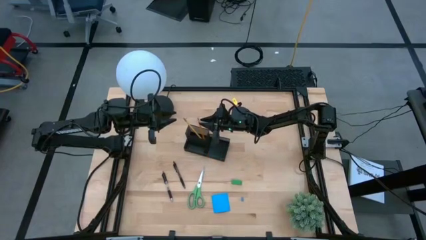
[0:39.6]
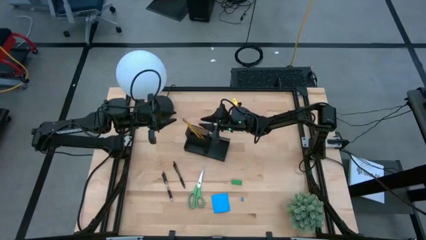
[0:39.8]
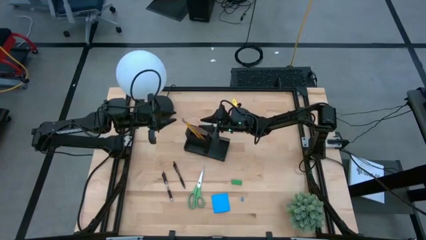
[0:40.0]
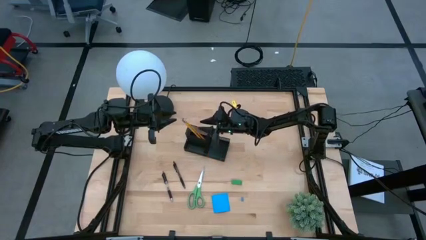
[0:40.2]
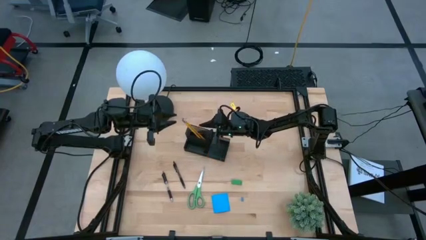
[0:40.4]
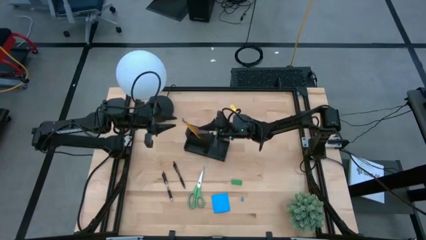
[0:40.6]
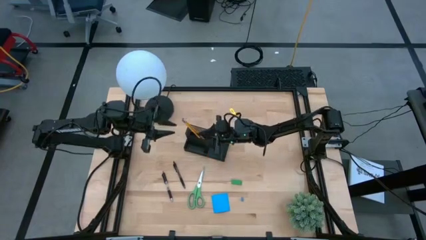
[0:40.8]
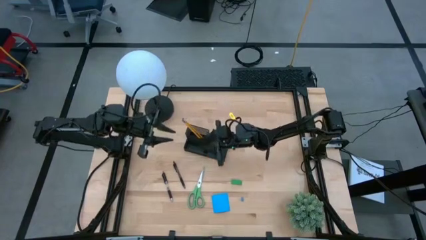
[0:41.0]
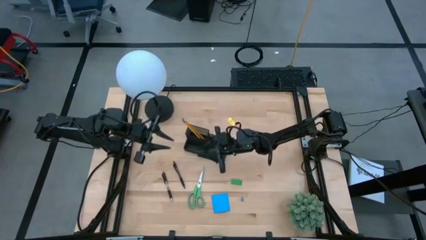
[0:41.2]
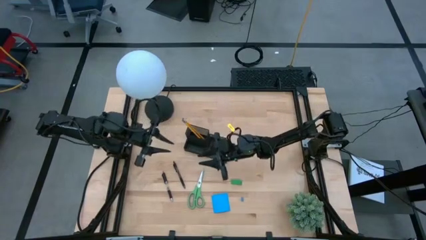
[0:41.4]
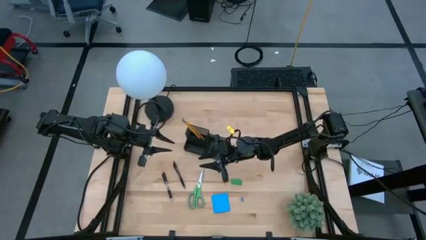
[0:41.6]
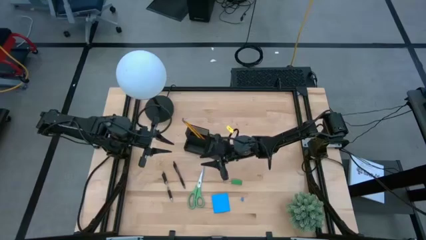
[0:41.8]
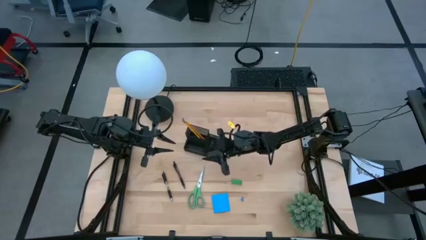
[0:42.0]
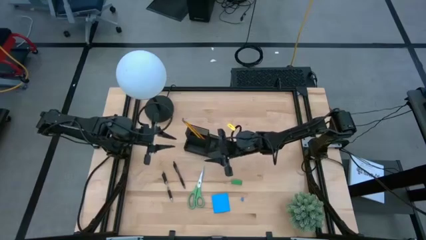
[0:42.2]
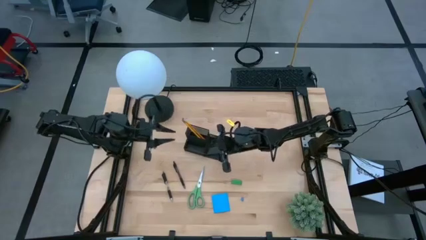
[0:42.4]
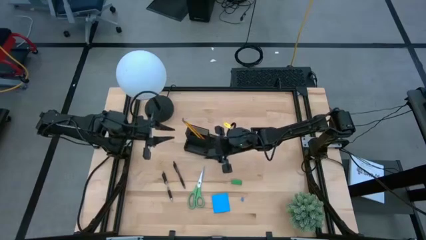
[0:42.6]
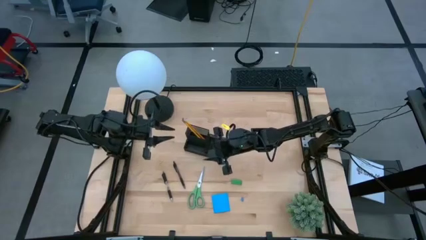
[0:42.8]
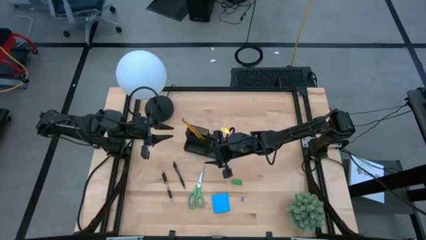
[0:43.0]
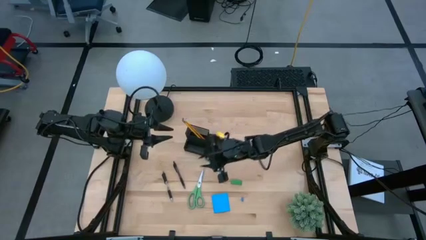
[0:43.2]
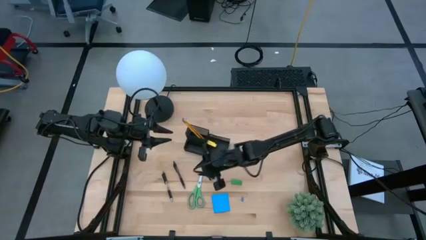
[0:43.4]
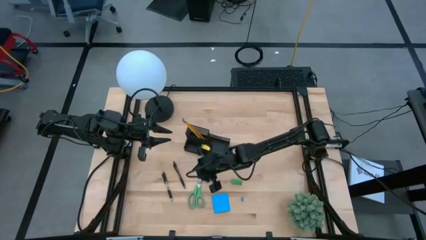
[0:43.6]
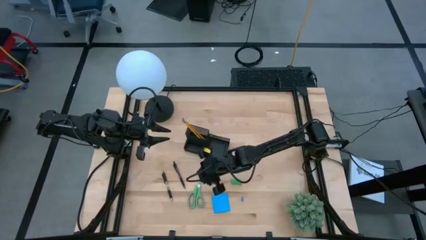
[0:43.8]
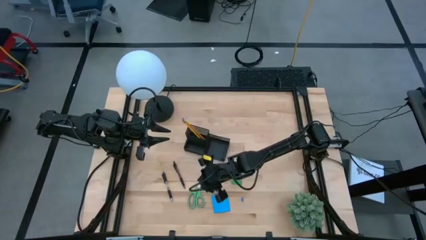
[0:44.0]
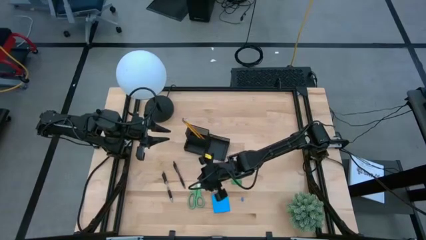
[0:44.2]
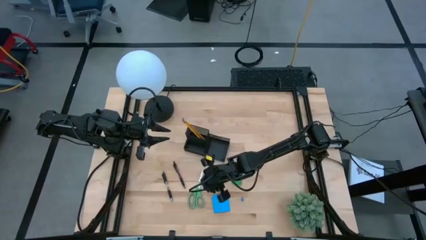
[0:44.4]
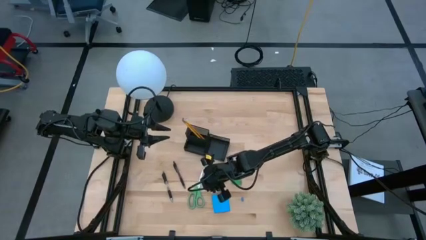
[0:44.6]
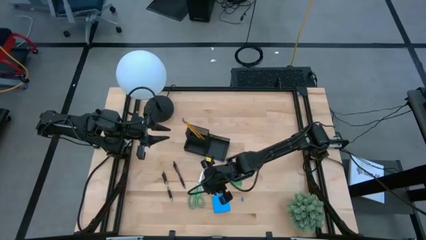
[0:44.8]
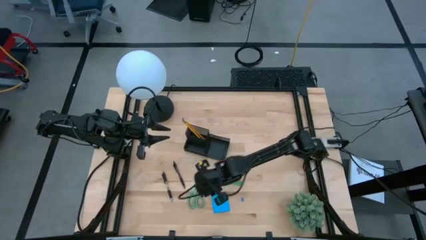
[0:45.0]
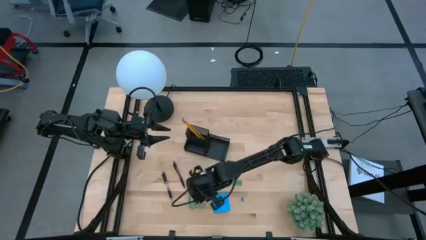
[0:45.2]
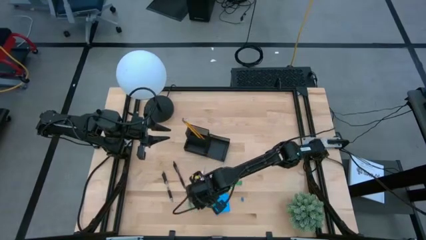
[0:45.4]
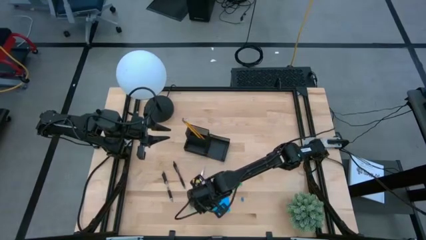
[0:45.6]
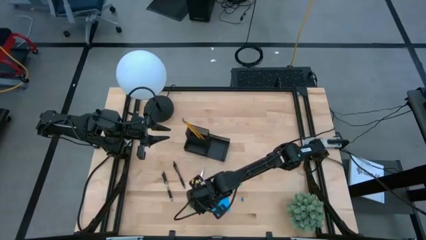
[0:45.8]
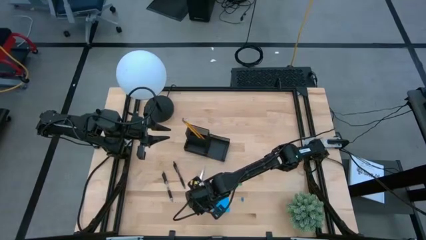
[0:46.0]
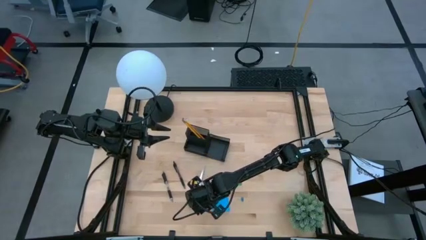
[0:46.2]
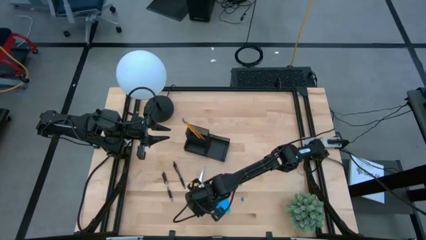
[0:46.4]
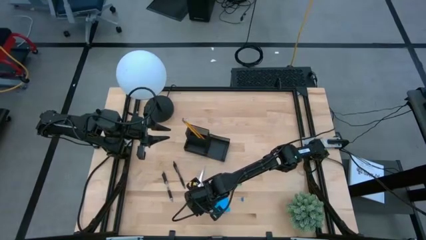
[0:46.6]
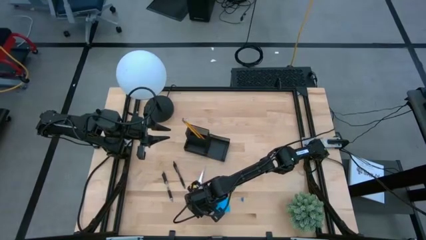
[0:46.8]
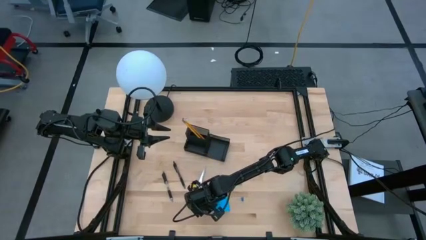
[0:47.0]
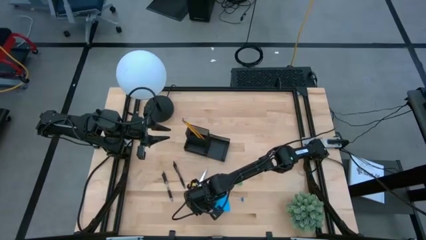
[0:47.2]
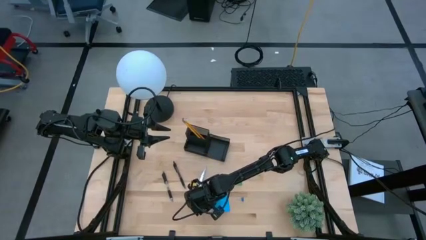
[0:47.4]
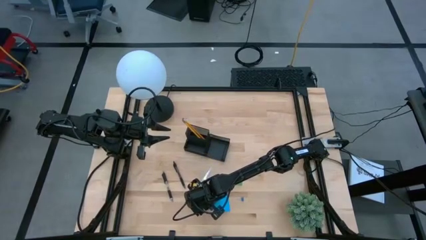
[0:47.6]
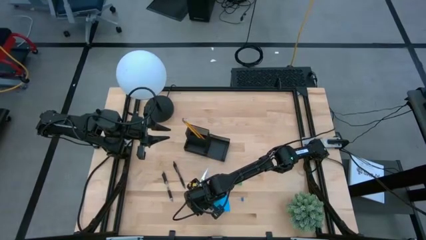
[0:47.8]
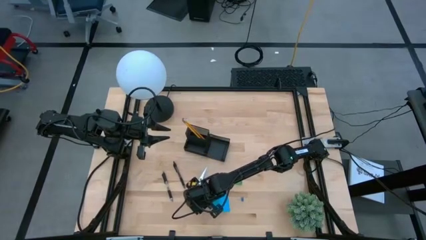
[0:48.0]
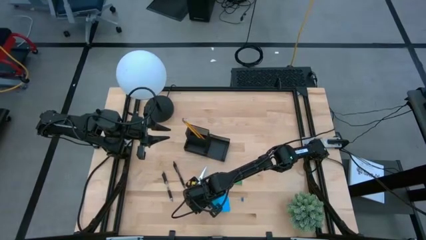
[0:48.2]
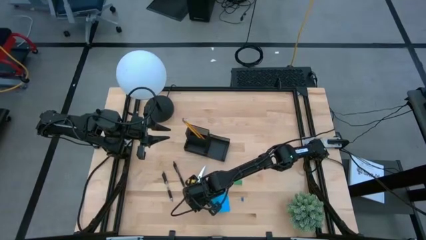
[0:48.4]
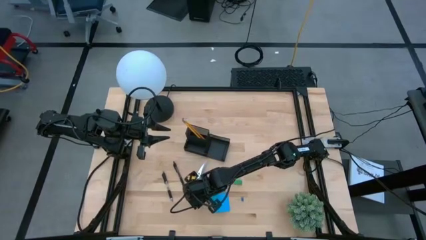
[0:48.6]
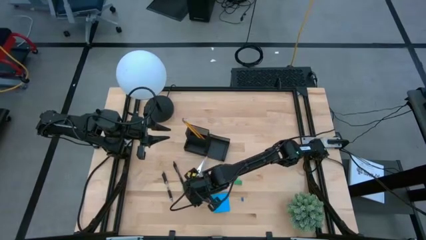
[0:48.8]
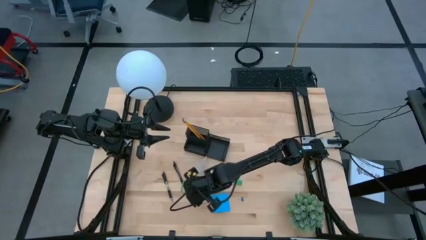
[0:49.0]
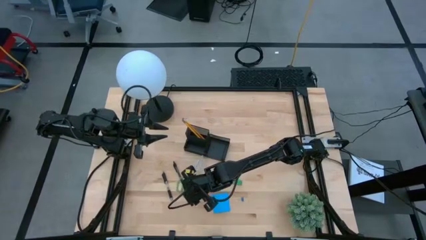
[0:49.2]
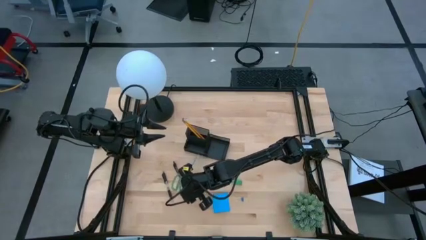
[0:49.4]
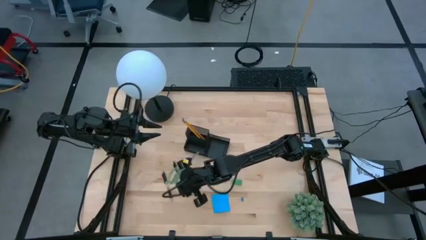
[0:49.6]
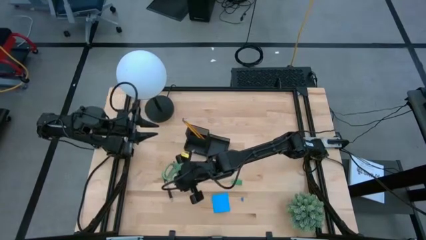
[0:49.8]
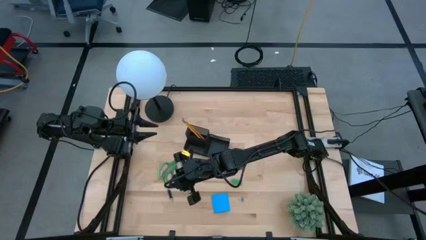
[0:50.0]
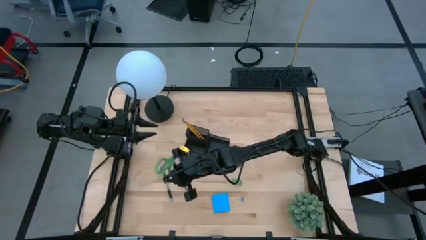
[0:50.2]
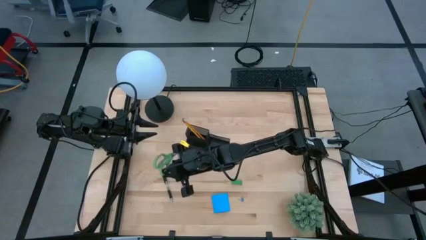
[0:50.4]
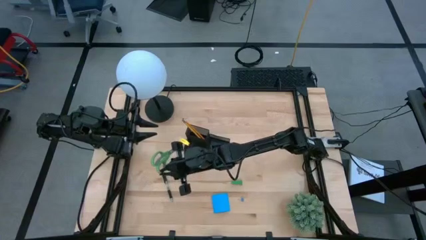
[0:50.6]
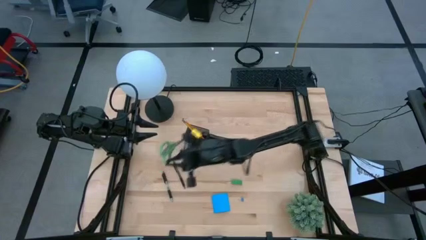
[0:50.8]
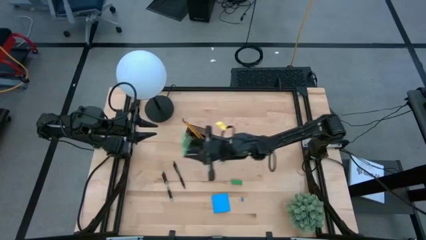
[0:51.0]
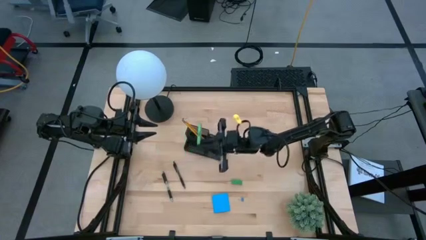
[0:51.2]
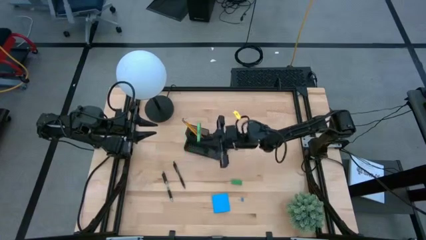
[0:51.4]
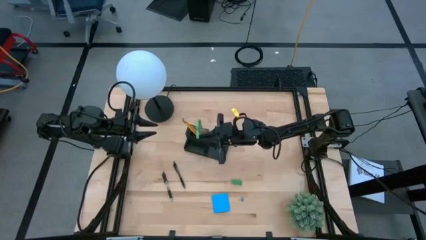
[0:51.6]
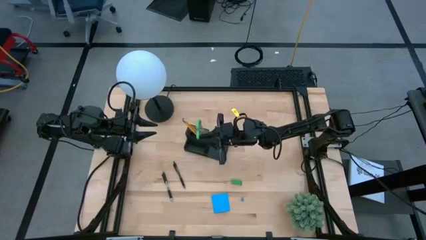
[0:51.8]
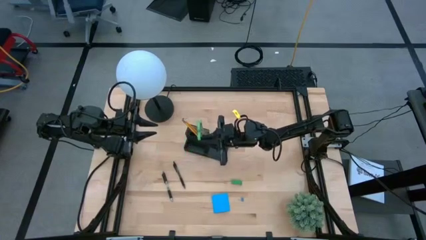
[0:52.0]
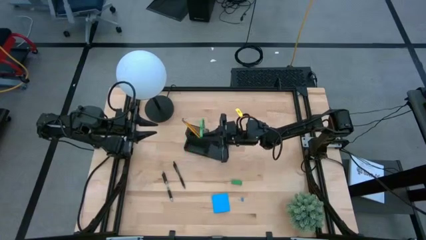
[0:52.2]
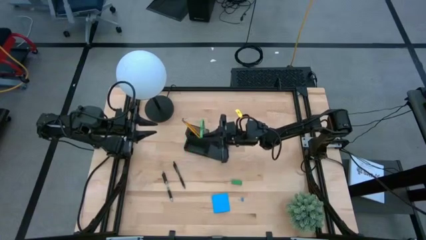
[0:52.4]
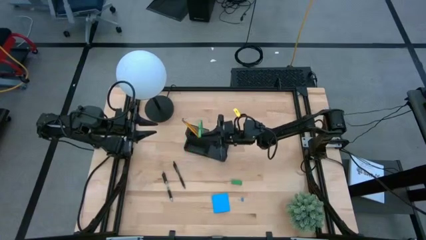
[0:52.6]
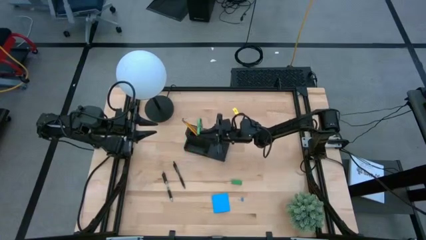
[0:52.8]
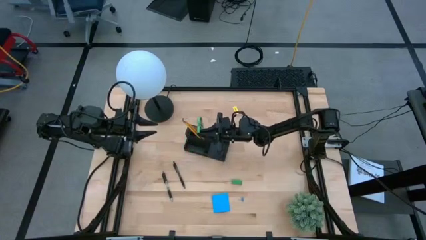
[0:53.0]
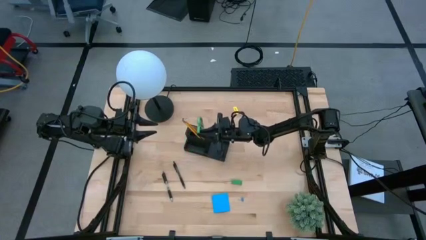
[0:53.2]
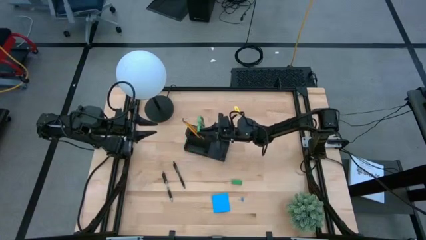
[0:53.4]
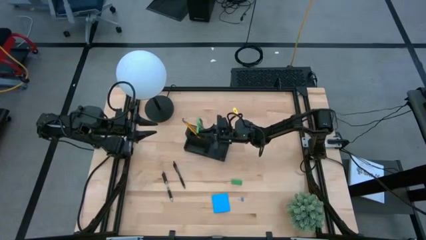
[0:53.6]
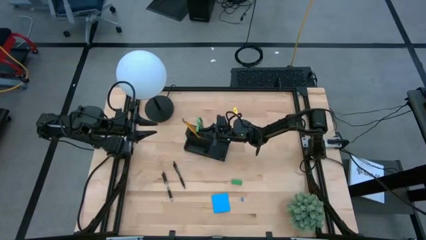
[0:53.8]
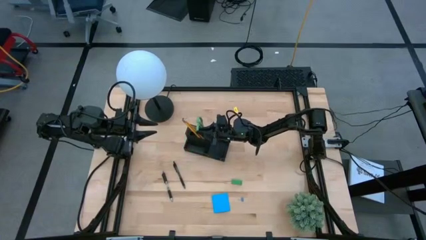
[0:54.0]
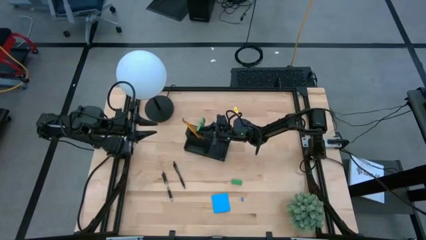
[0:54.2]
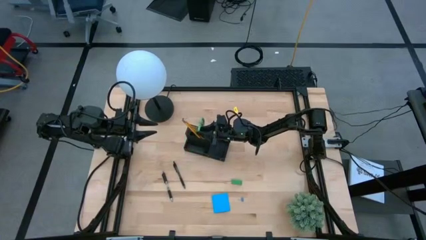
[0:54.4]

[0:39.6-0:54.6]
Task: Pick and place office supplies into organizer
Put the green scissors into the black desk organizer
